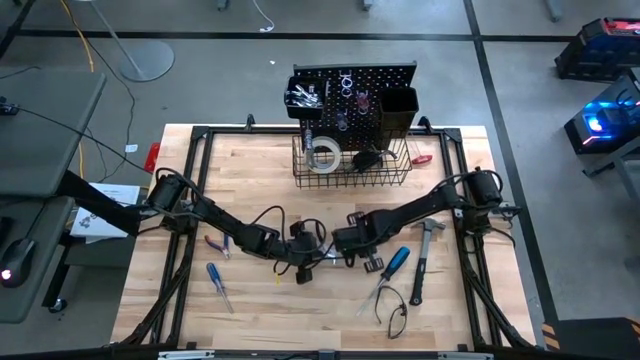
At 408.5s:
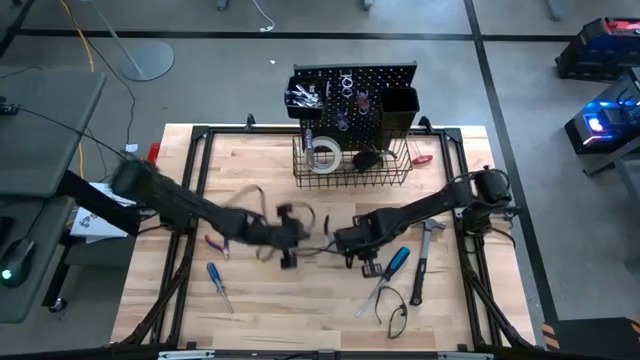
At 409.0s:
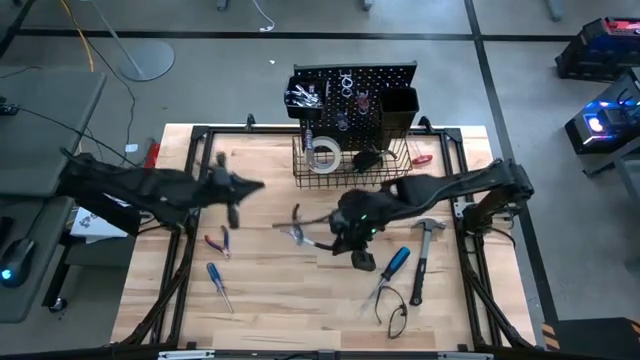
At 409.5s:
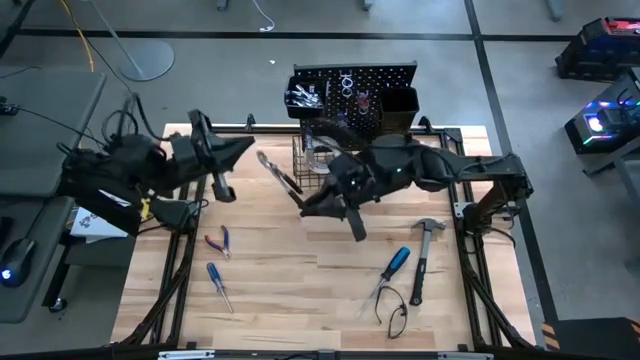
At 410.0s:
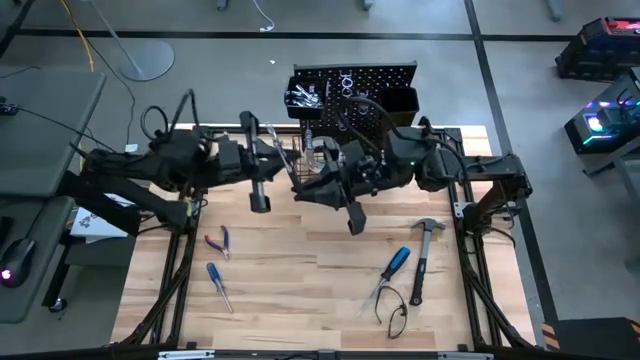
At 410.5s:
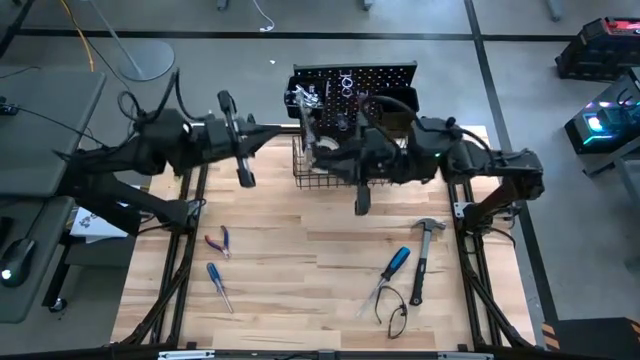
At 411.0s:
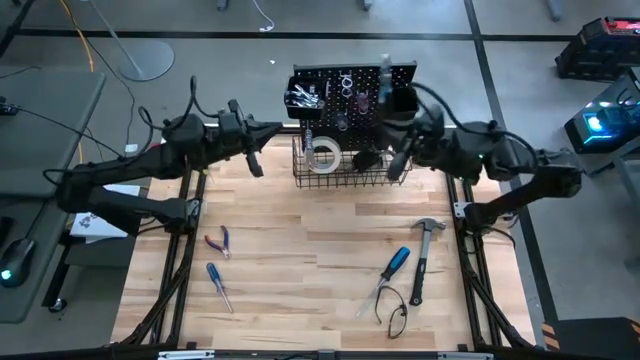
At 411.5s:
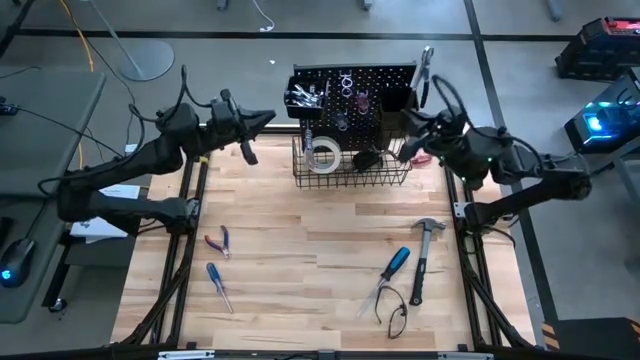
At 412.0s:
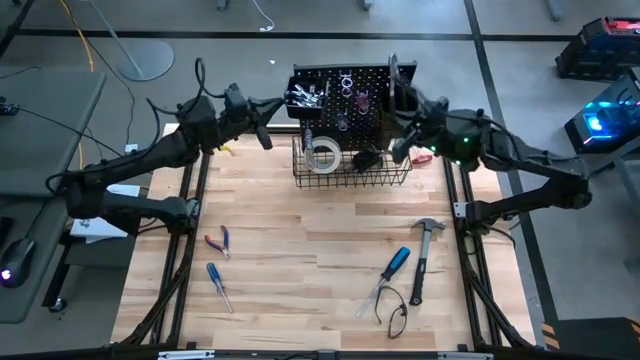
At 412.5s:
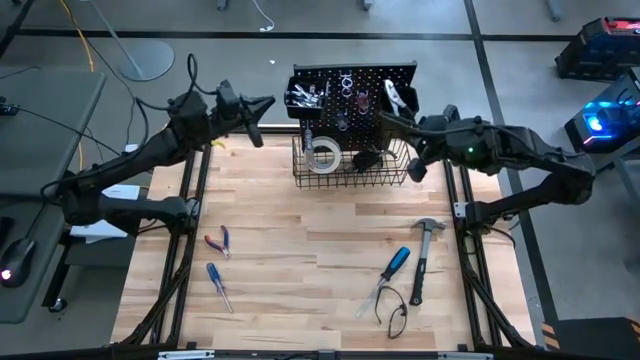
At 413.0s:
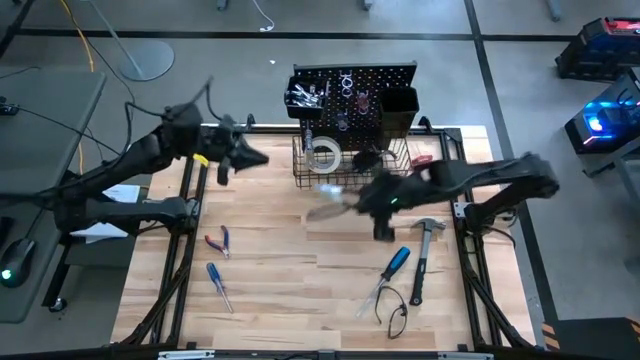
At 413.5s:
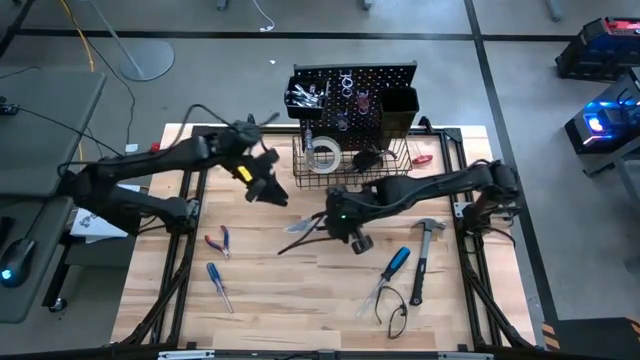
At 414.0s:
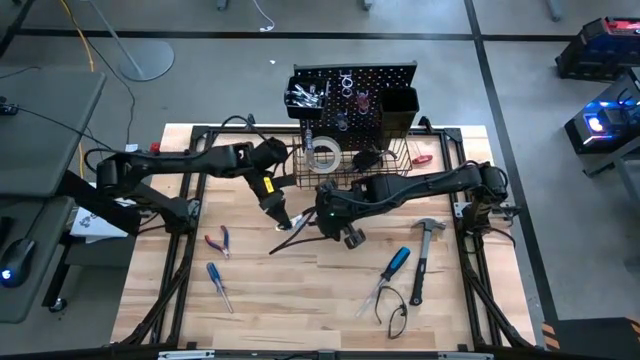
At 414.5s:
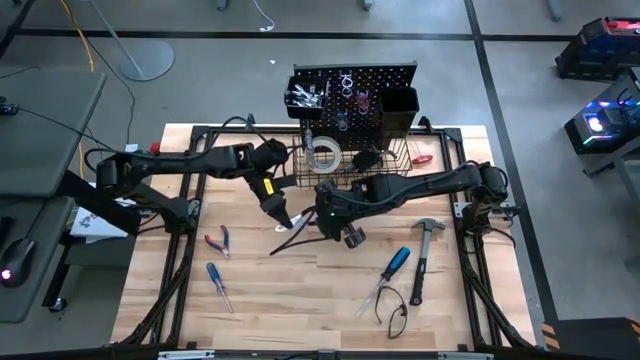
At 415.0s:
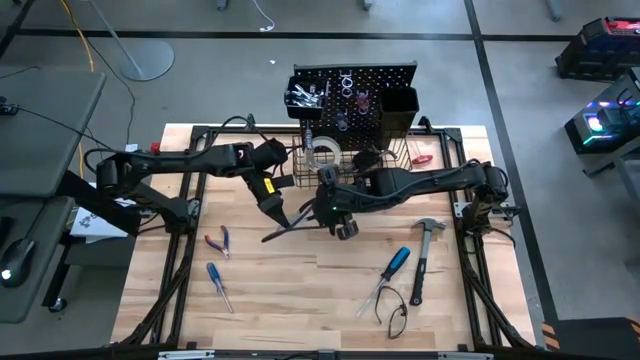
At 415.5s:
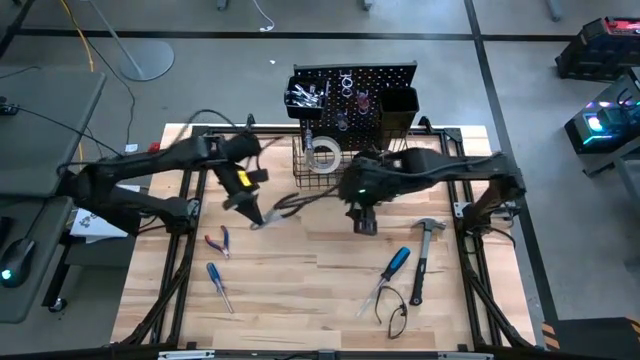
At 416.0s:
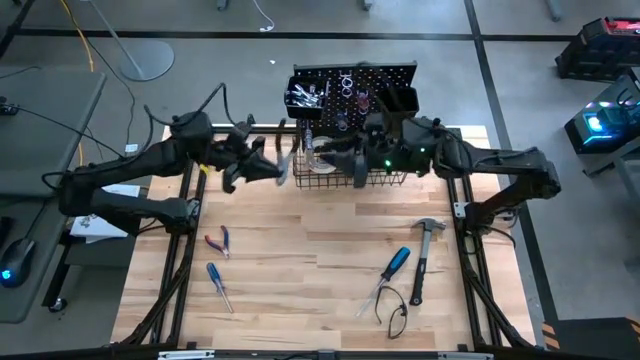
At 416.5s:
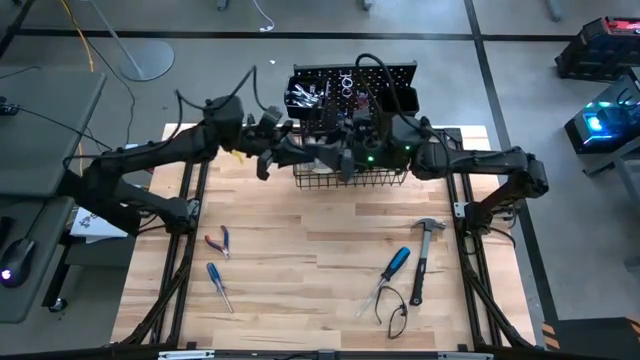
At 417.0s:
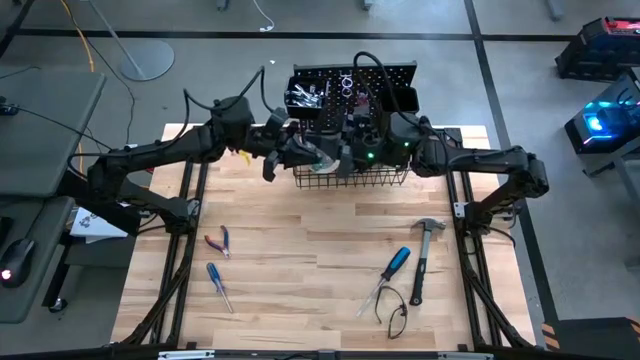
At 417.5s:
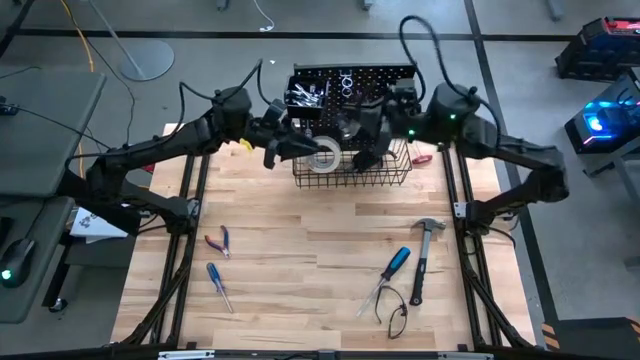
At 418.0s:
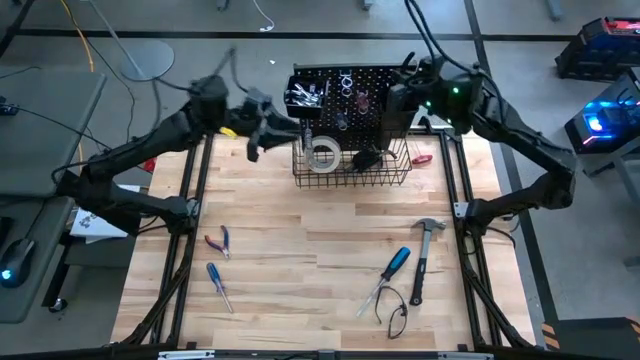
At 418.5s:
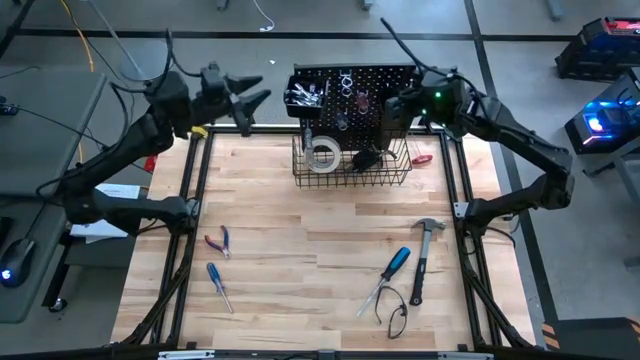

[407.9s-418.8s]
Task: Hang tools onto peg board
Put the black plier in the right black bin on the pegboard

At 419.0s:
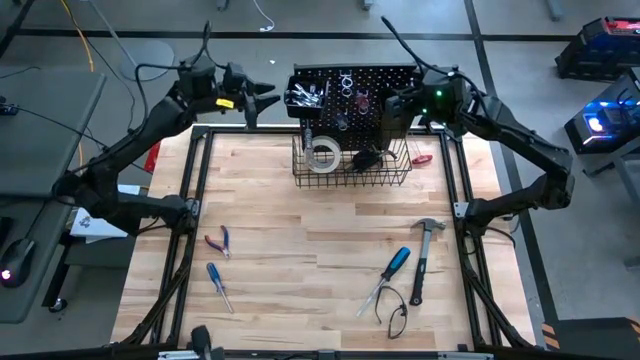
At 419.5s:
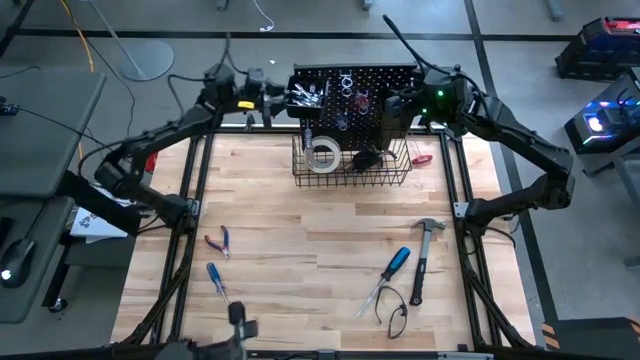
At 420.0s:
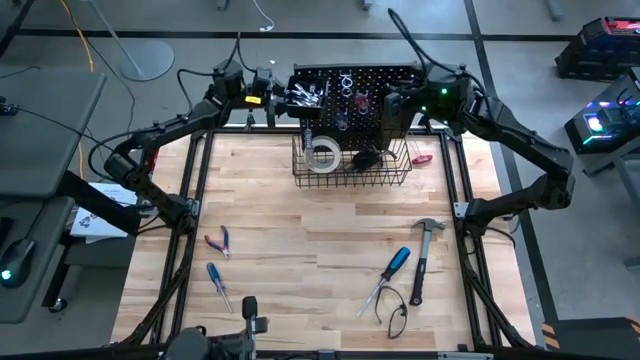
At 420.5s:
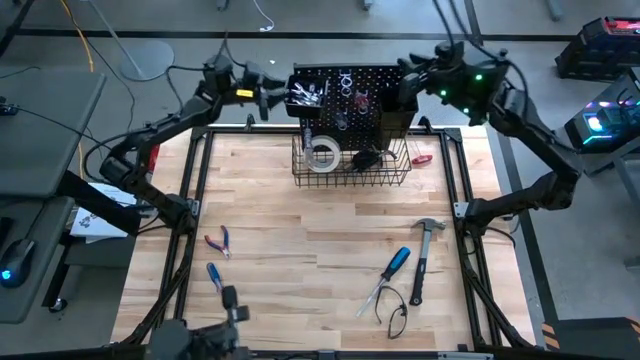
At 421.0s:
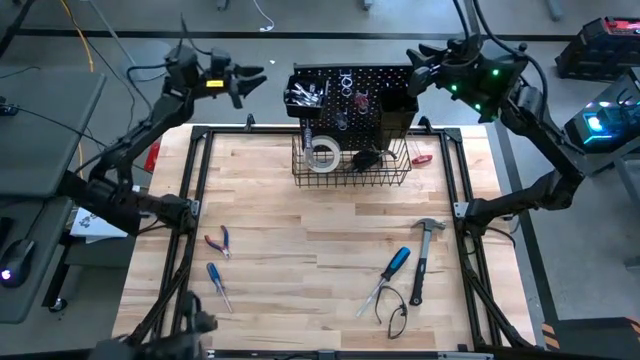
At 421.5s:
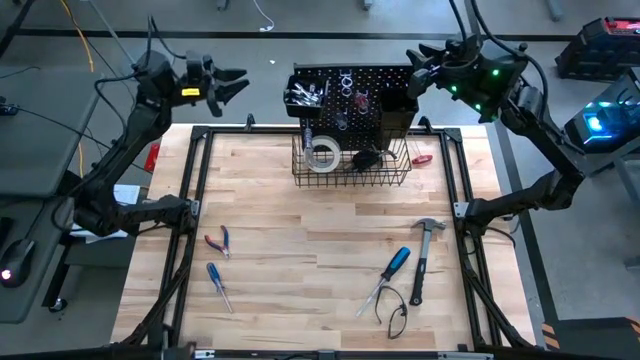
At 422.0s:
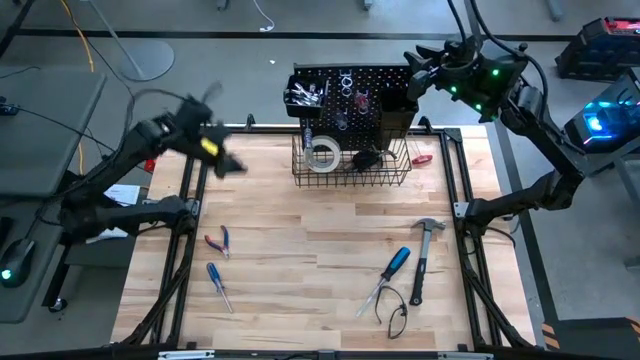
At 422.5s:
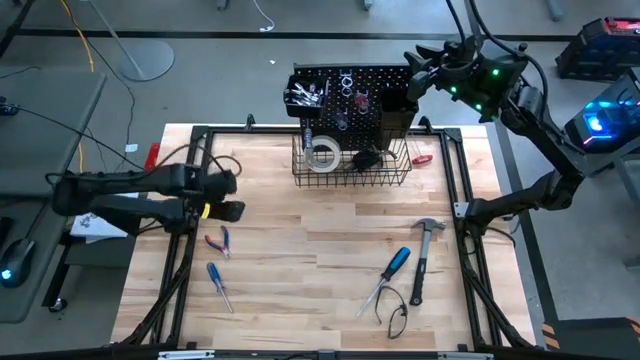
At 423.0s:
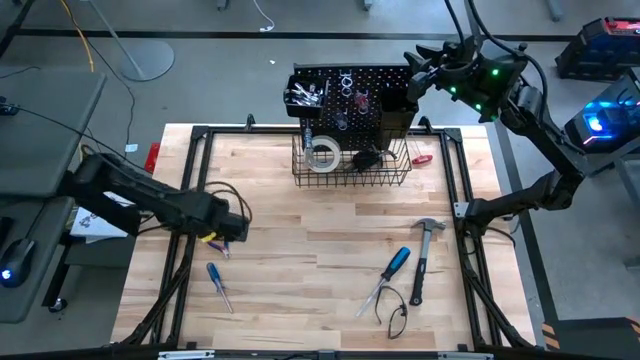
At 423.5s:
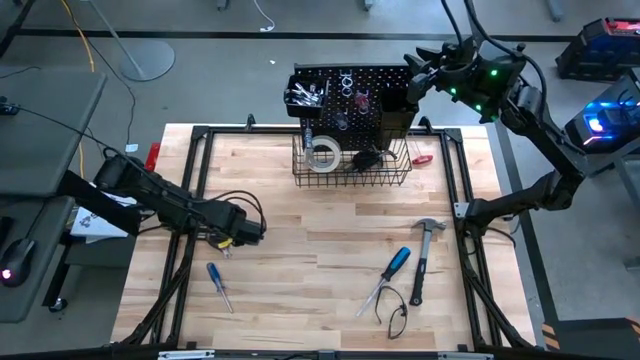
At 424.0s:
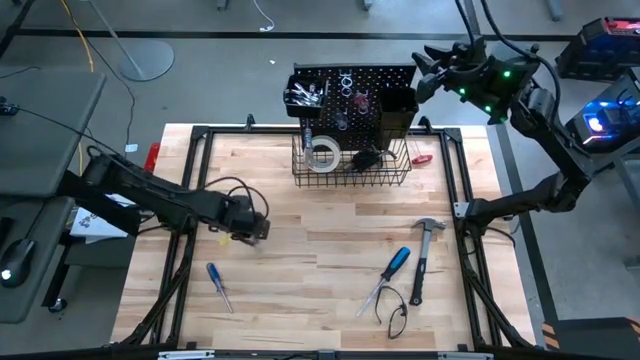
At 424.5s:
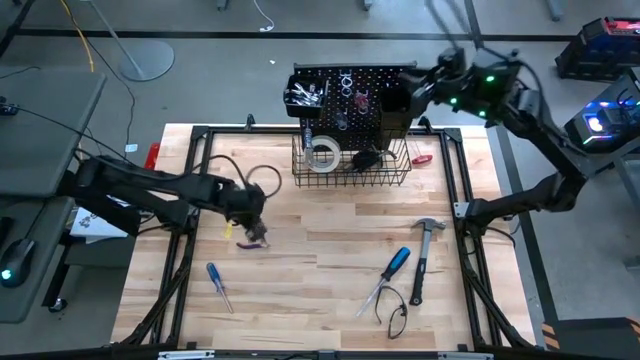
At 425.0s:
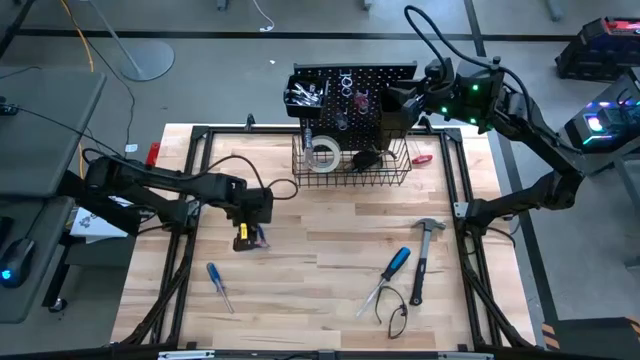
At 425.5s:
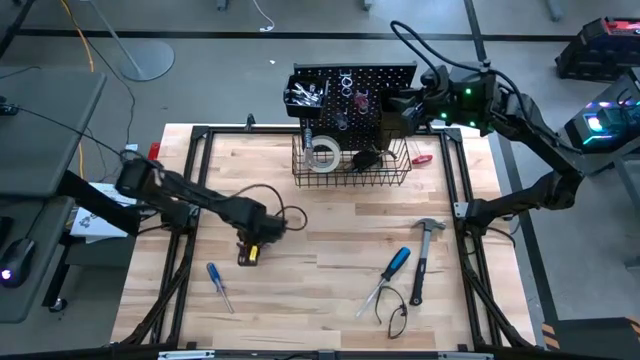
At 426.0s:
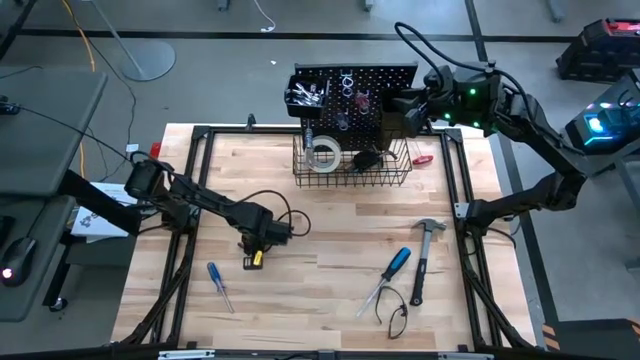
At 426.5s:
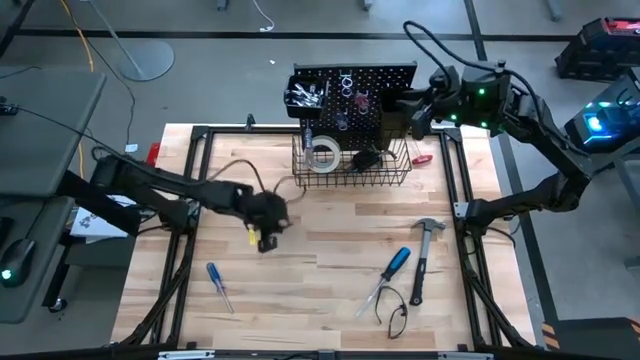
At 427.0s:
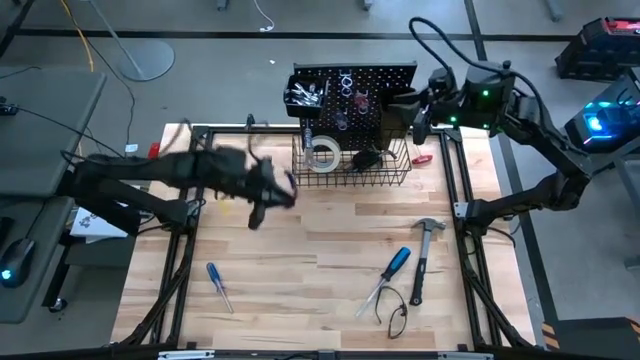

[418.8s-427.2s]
Put the blue plier in the right black bin on the pegboard

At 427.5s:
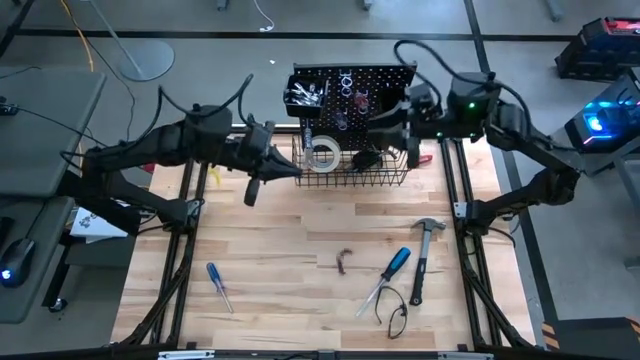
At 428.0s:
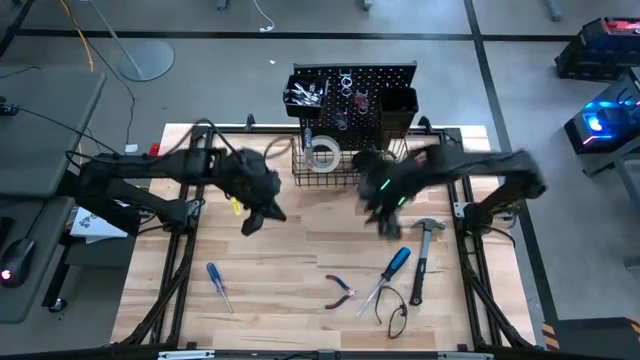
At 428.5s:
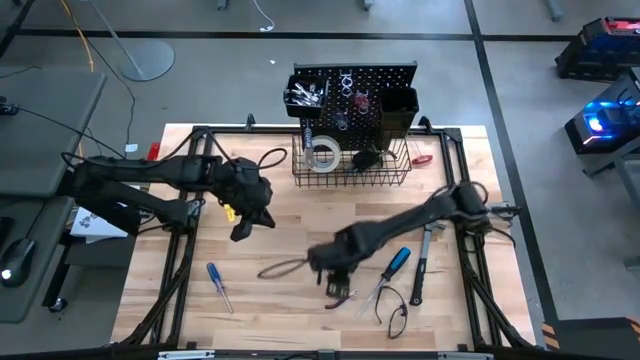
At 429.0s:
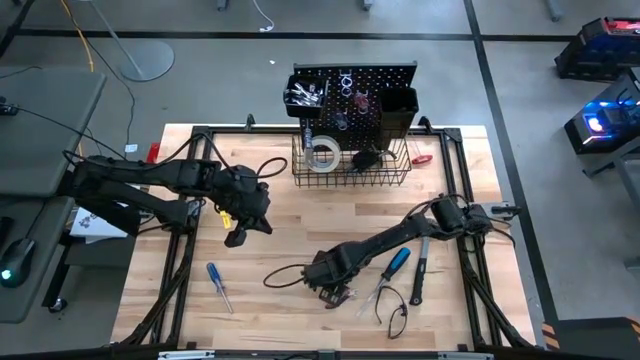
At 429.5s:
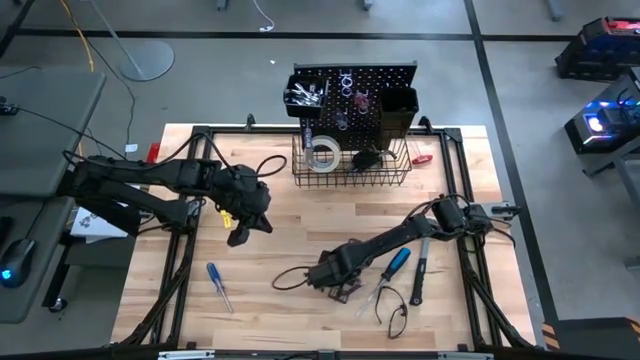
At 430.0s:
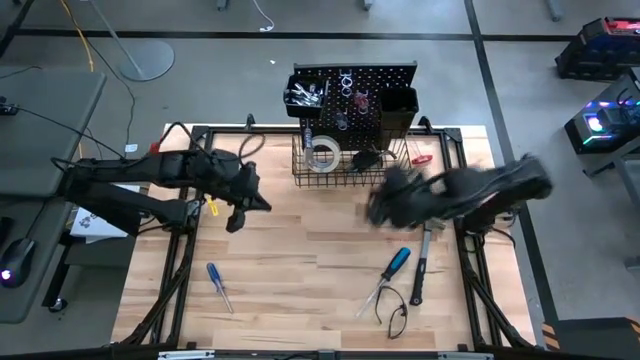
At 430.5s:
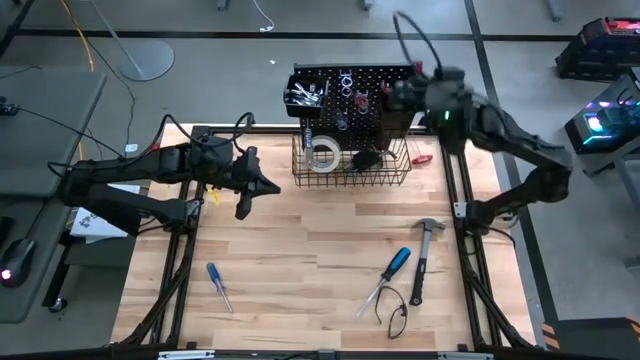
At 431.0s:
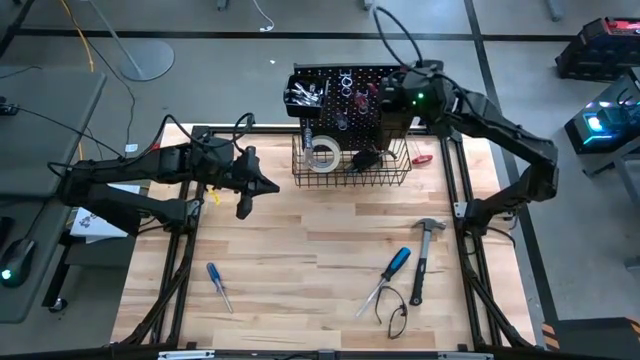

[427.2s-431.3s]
Put the blue plier in the right black bin on the pegboard
